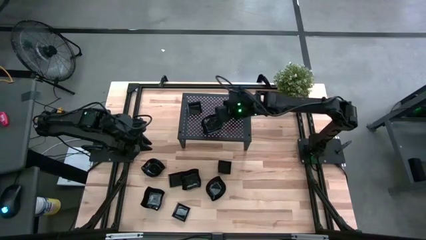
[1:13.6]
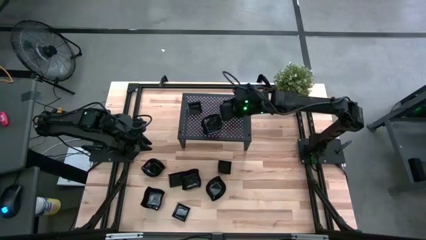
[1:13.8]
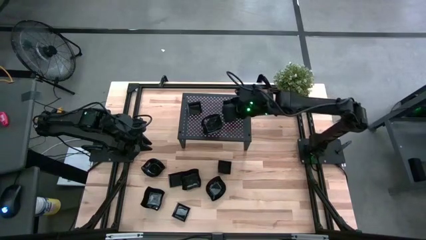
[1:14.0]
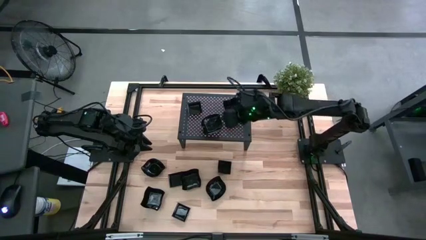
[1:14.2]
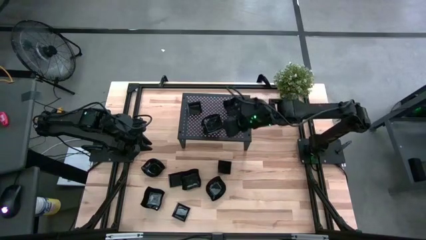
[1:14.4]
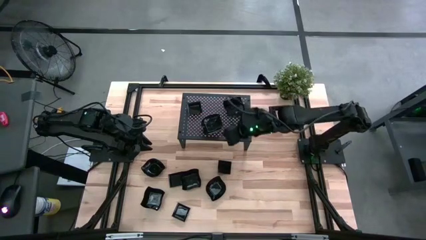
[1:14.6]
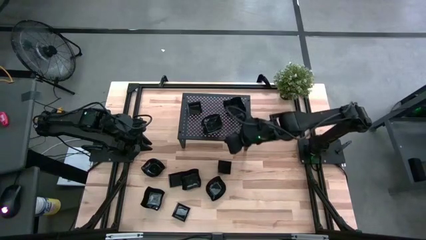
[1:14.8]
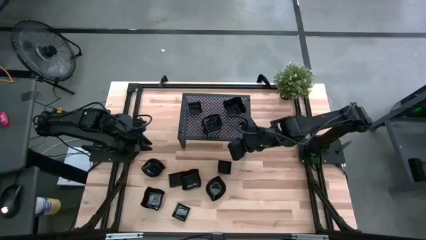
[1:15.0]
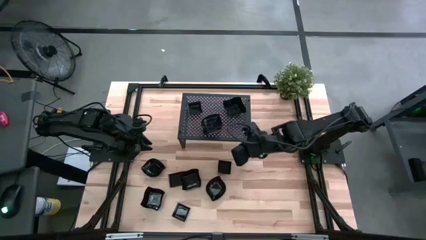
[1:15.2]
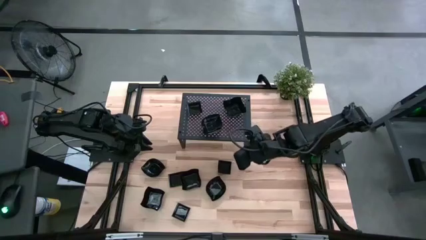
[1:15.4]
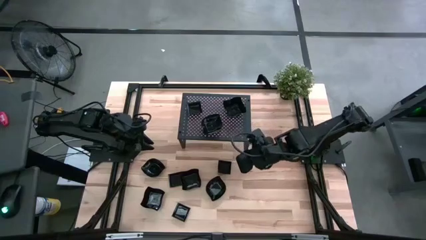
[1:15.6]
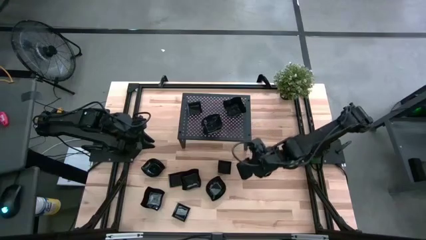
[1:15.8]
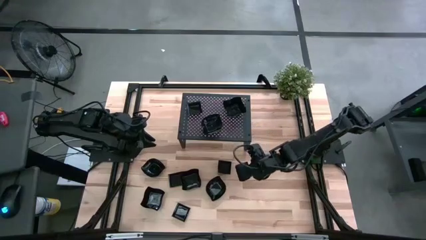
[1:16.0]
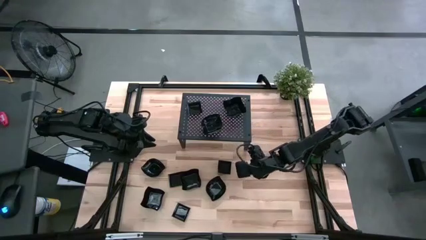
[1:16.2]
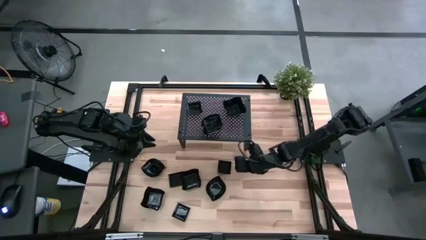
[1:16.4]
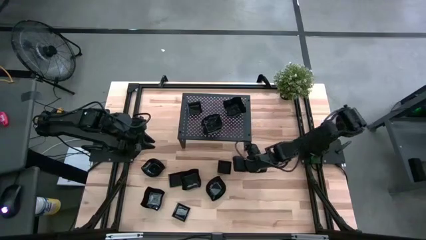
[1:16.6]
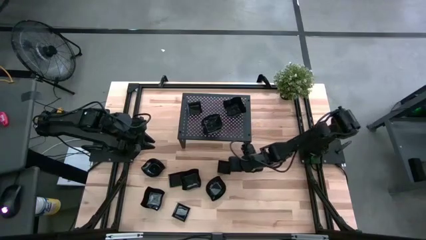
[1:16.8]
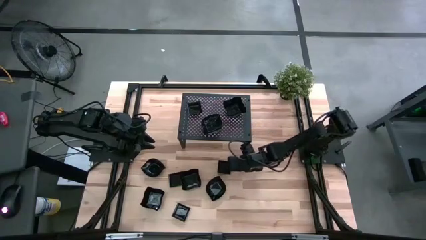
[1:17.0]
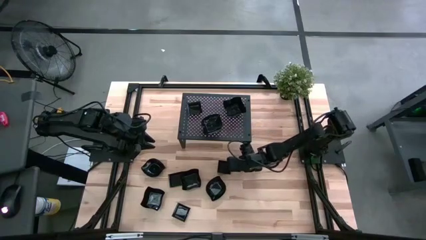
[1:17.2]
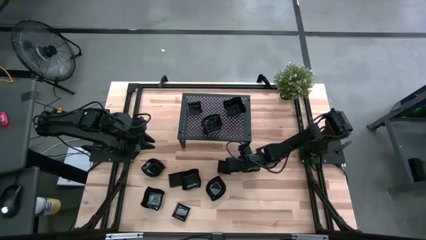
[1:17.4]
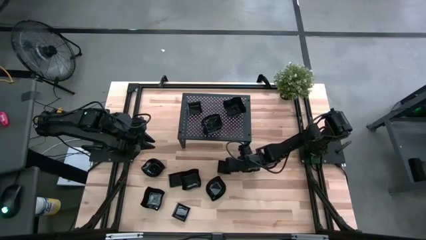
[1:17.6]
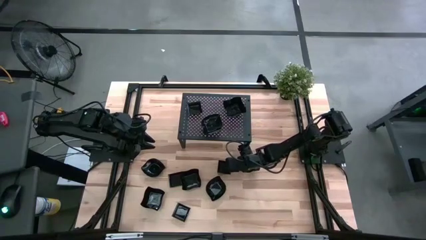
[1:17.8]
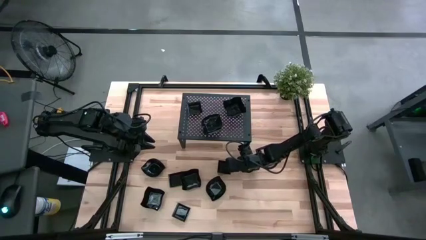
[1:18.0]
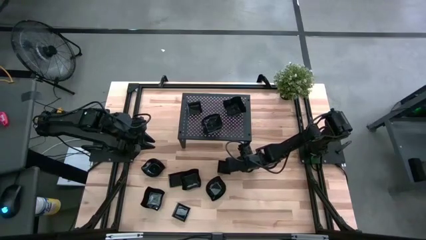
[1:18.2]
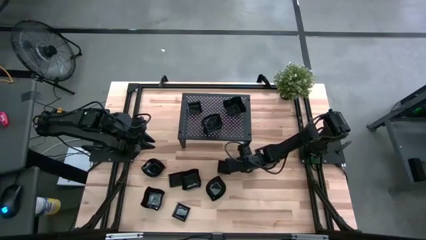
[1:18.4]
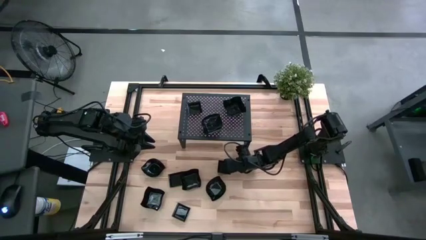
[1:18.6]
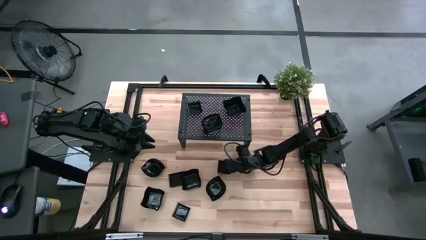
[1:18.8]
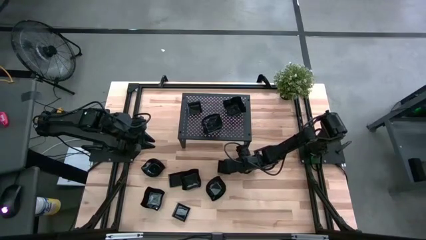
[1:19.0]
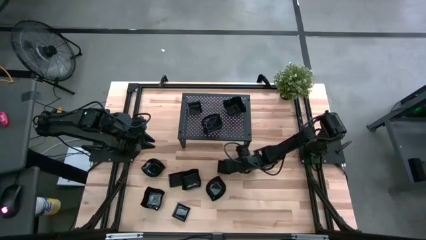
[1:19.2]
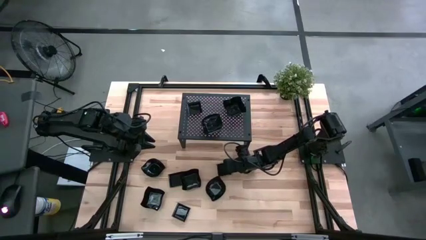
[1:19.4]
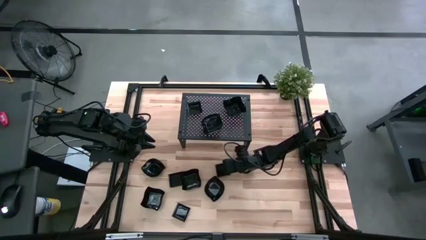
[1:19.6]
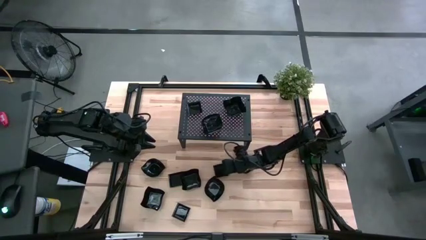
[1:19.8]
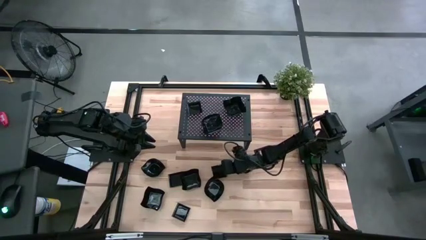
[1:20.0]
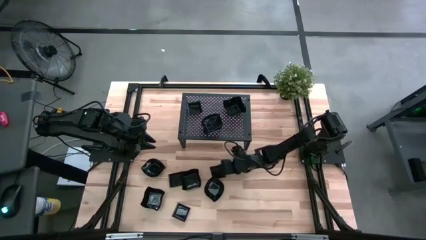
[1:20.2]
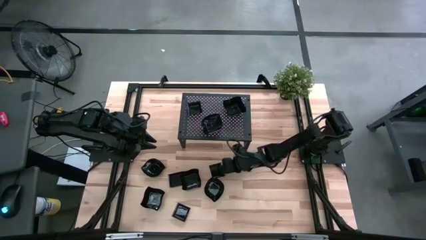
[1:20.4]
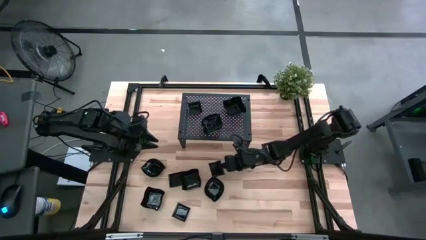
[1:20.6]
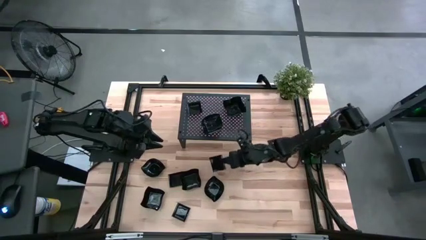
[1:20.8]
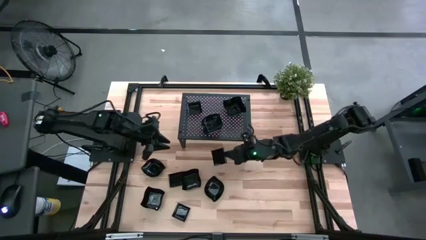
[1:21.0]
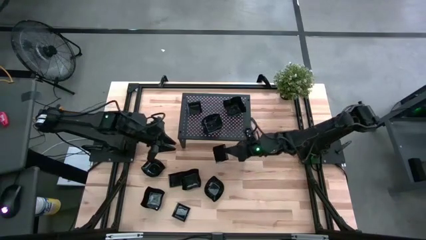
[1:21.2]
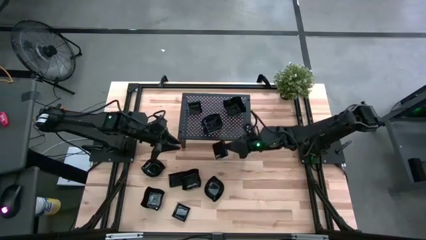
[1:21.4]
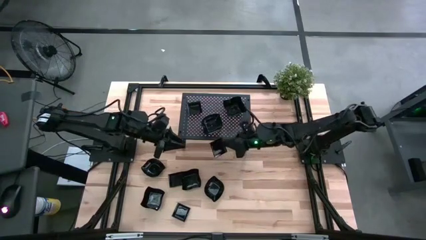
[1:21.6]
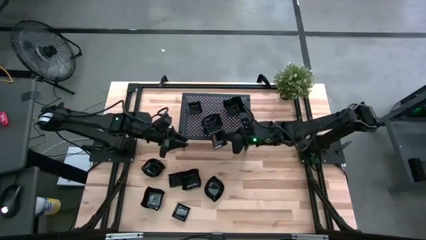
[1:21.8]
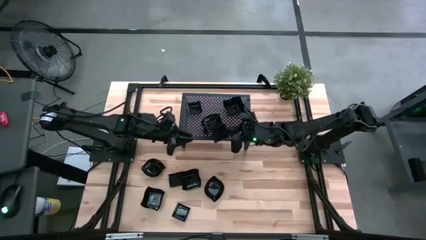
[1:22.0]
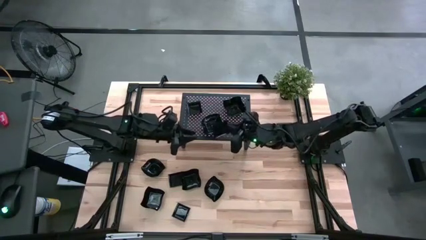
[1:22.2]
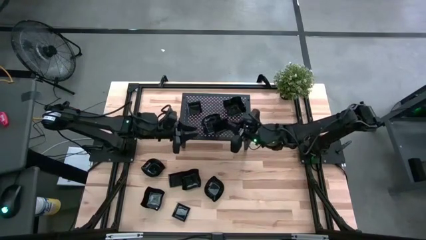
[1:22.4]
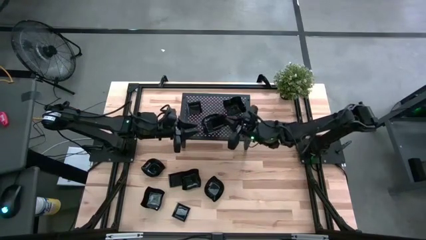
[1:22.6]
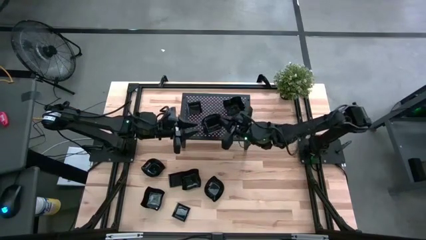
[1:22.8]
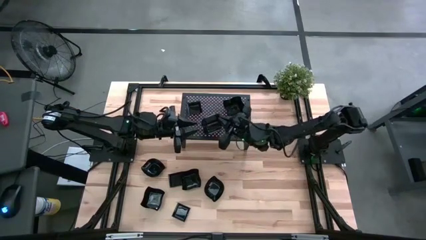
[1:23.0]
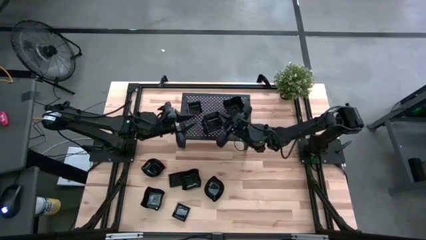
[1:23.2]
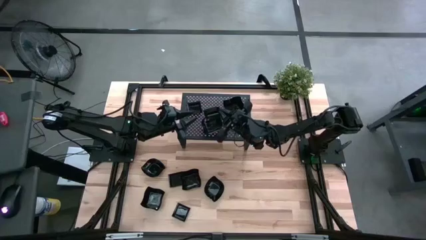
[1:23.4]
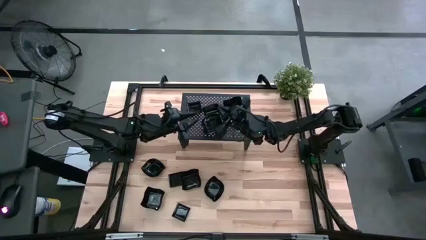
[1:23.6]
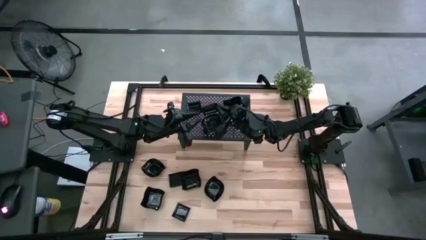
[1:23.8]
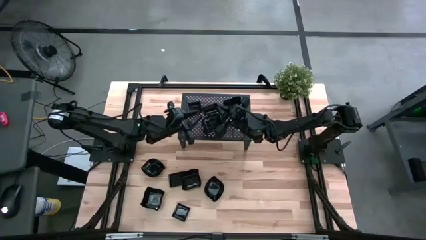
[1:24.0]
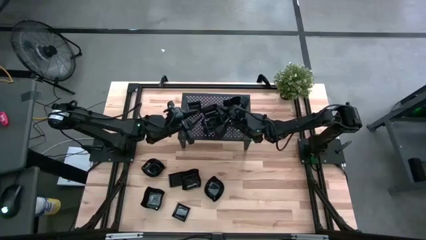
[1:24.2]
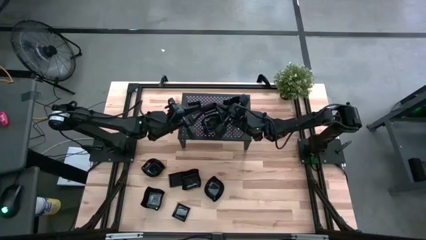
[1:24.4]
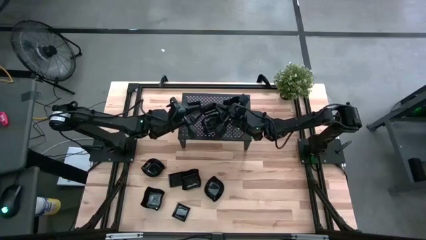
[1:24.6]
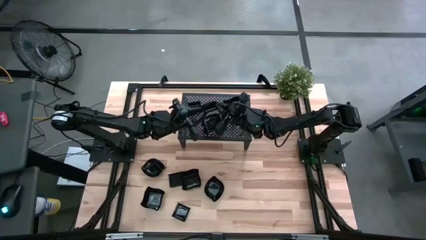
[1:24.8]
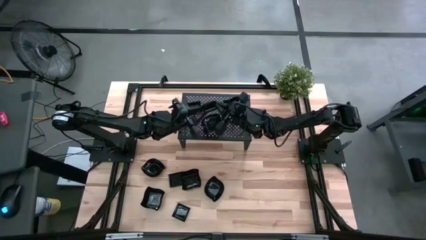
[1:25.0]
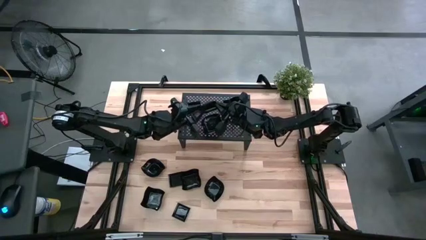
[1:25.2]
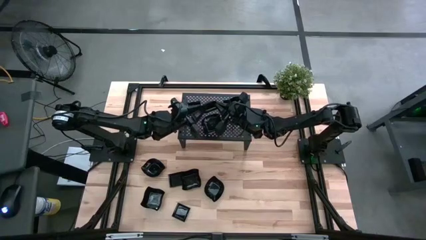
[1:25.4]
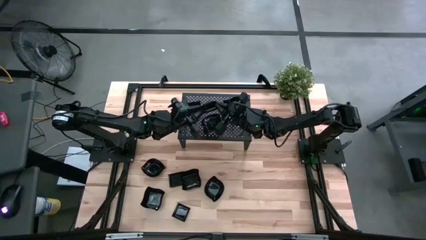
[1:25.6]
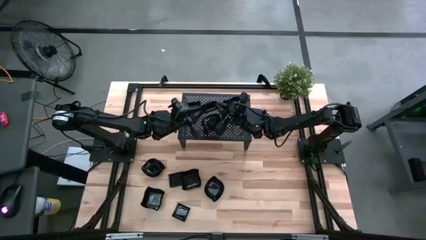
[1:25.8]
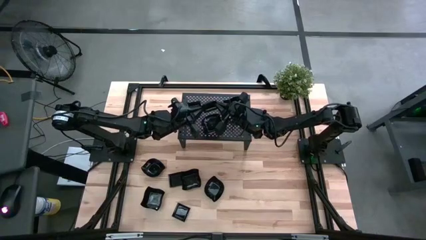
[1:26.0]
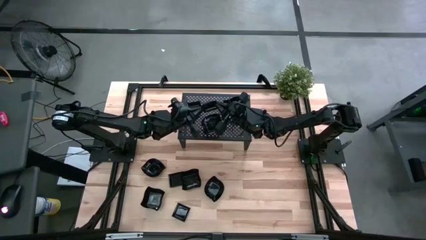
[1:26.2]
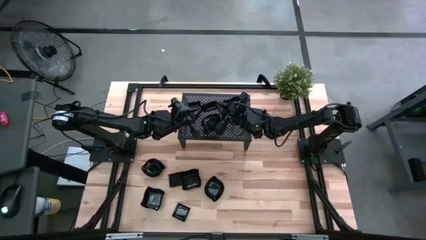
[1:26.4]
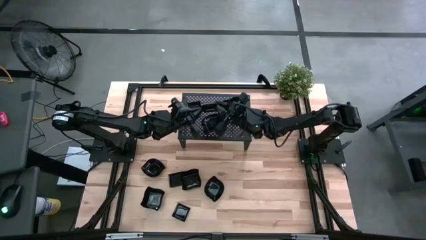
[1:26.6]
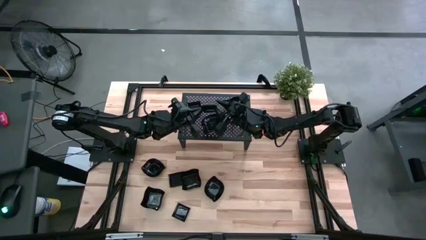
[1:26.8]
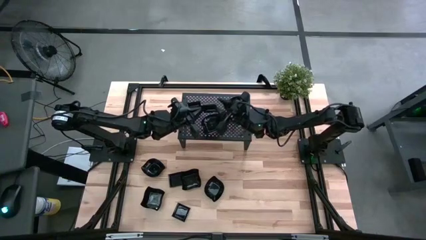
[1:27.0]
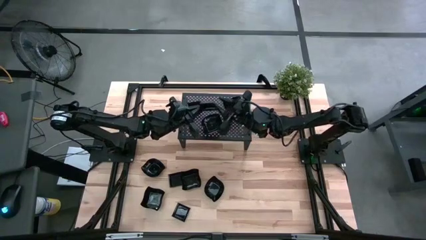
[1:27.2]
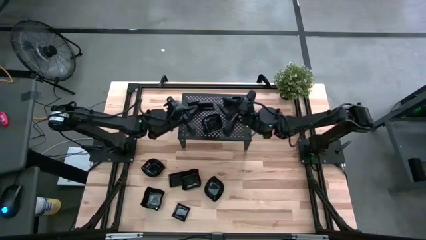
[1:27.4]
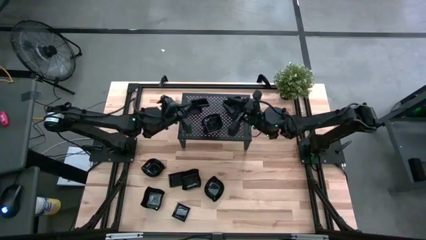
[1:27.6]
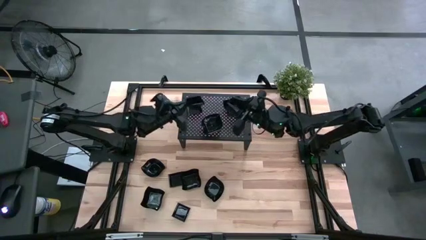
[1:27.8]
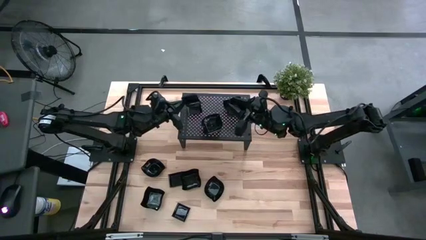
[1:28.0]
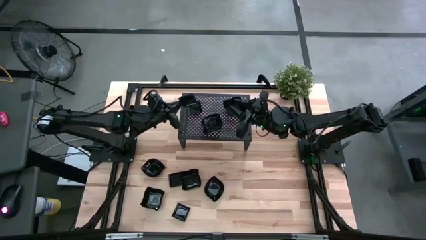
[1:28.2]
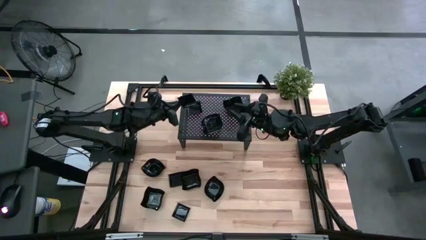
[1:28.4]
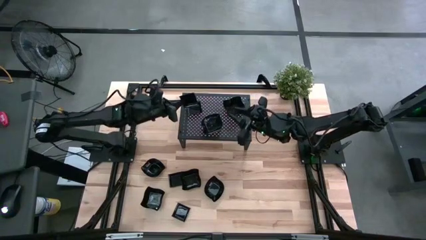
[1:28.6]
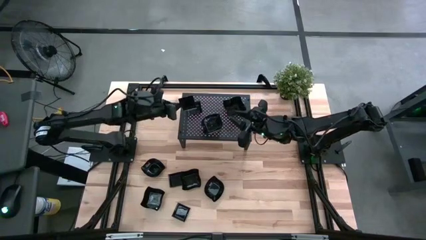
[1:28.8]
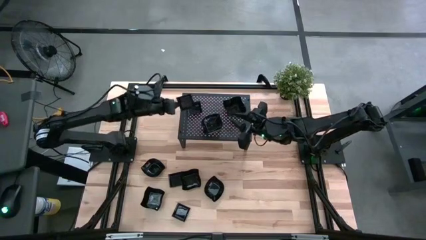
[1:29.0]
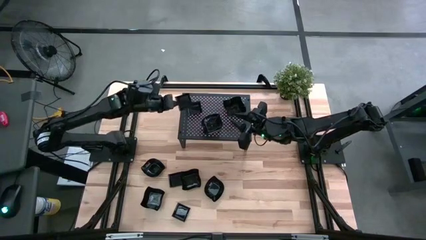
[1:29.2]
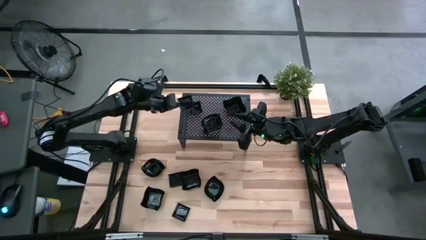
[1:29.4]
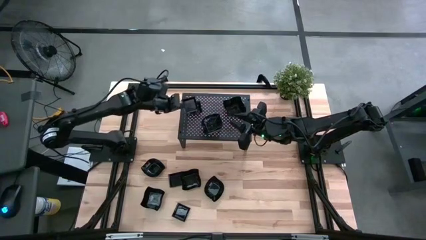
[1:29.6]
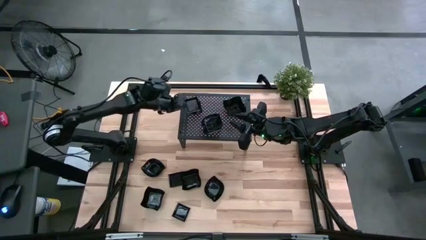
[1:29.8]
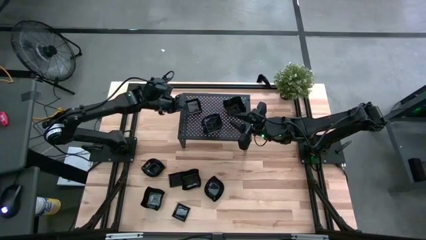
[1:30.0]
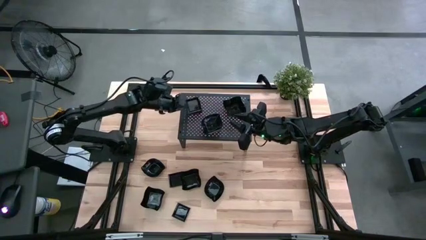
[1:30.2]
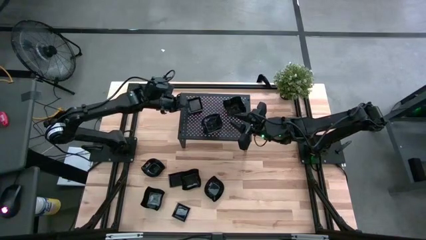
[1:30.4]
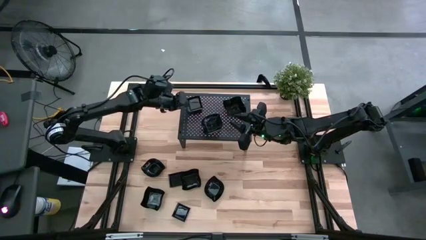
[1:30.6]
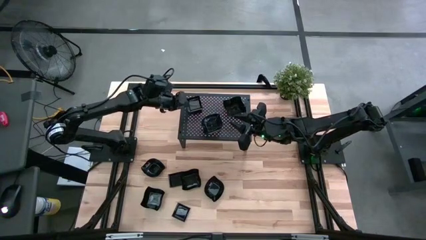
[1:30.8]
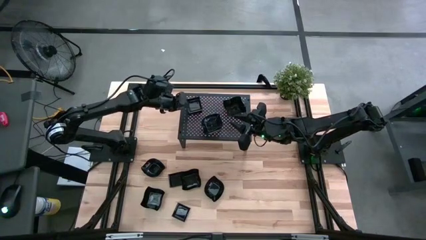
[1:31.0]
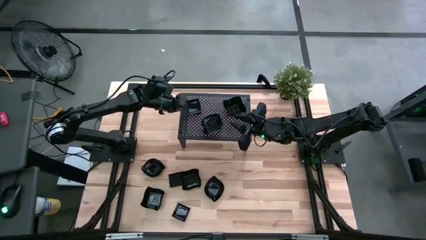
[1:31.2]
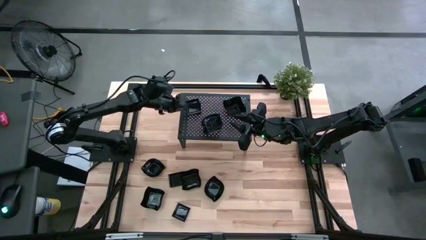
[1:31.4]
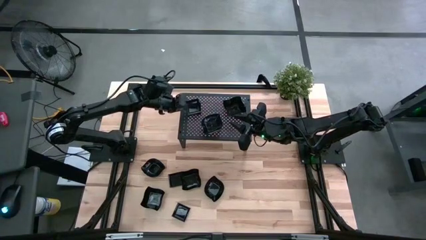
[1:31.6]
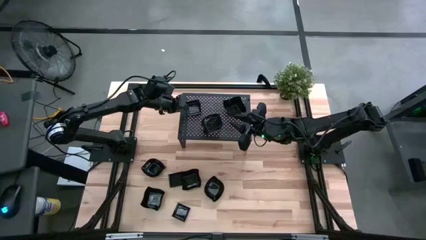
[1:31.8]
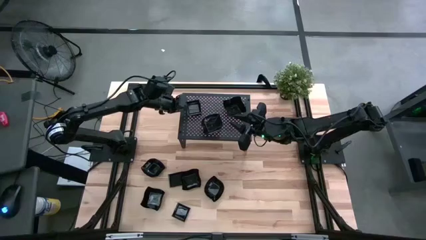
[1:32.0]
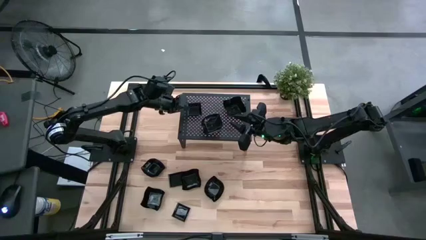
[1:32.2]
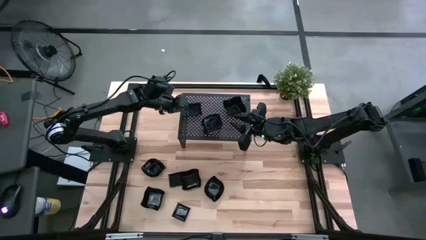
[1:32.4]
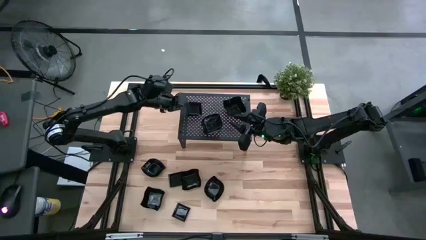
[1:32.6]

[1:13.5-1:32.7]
Task: Pick & Place Mini shaped plates
Stack the black square plate on top of the black square plate on the shelf
